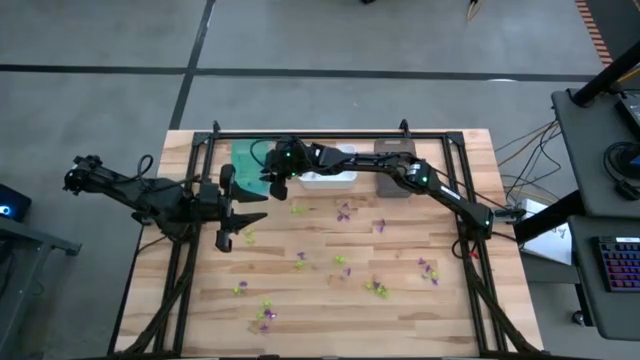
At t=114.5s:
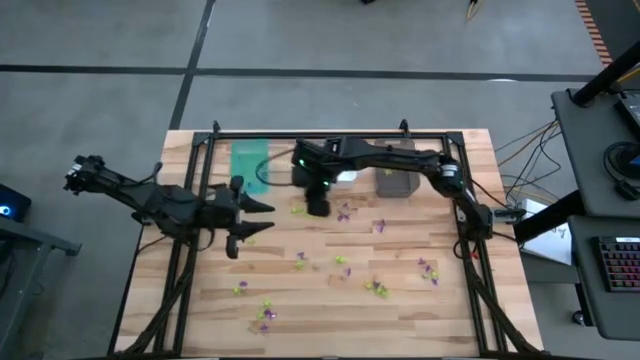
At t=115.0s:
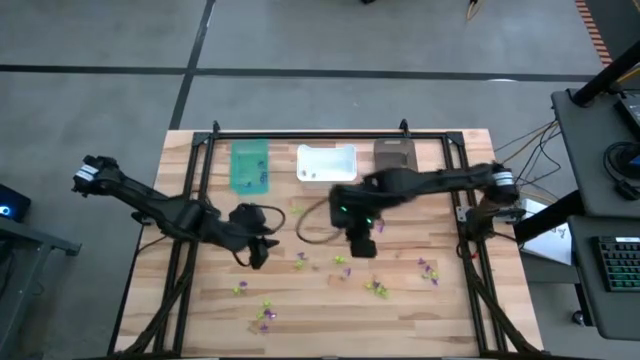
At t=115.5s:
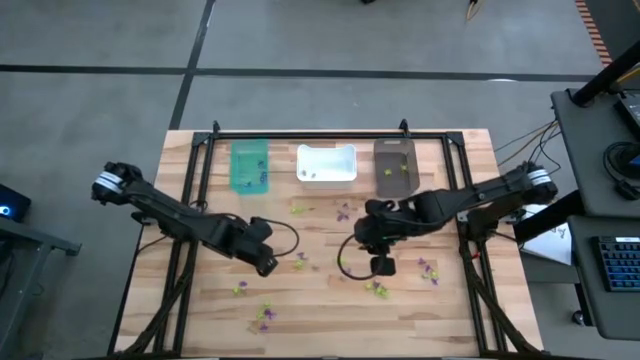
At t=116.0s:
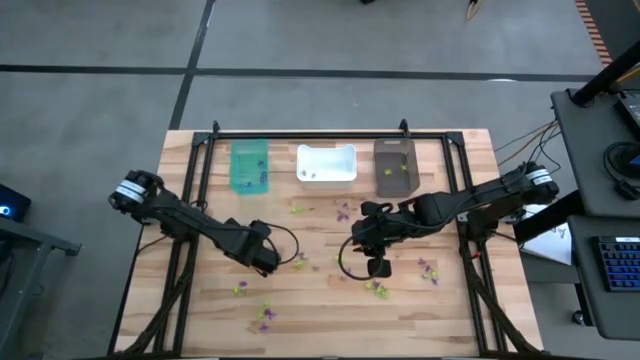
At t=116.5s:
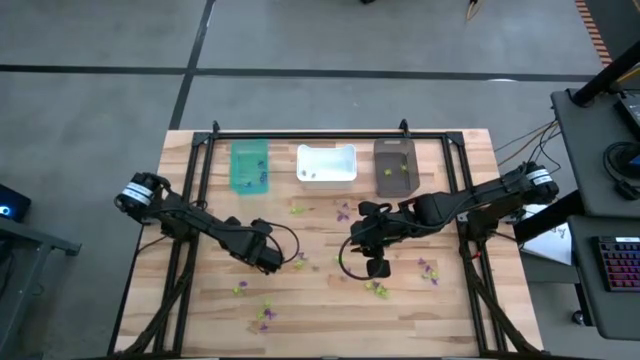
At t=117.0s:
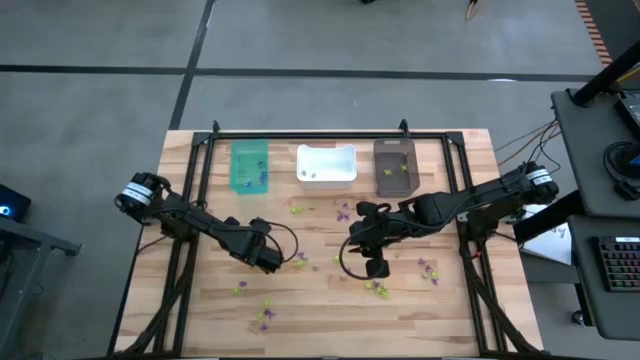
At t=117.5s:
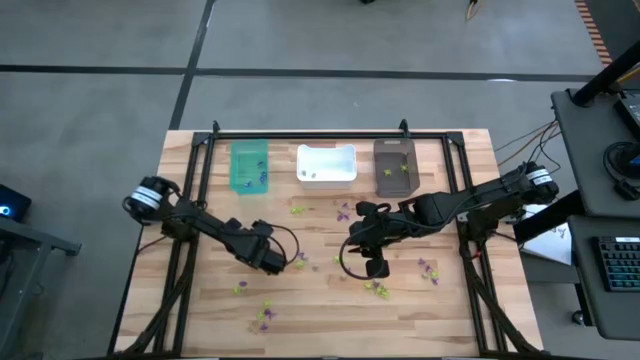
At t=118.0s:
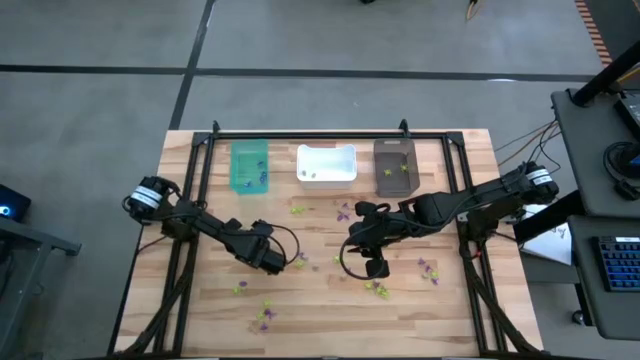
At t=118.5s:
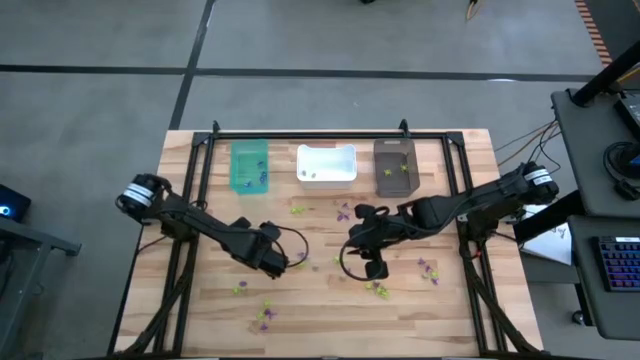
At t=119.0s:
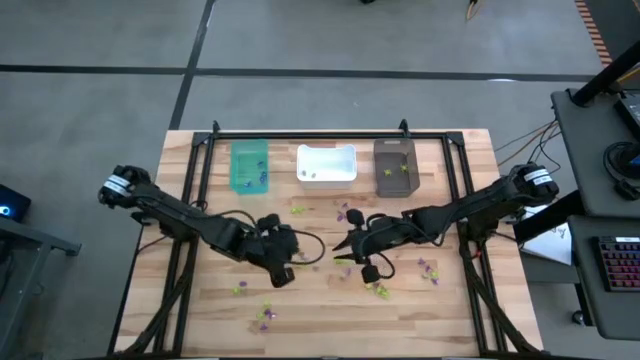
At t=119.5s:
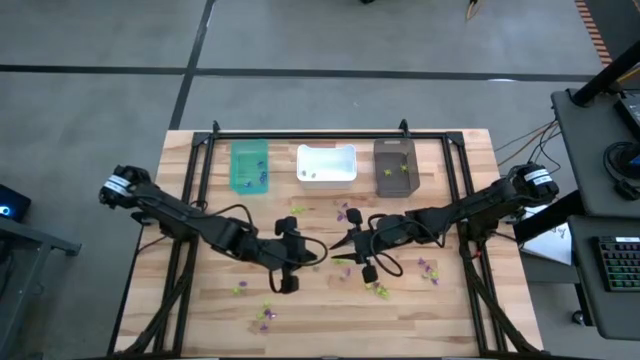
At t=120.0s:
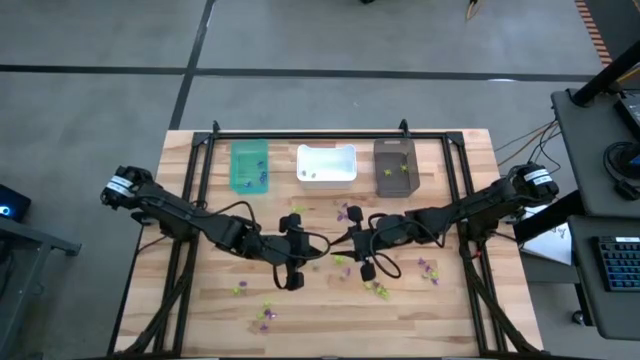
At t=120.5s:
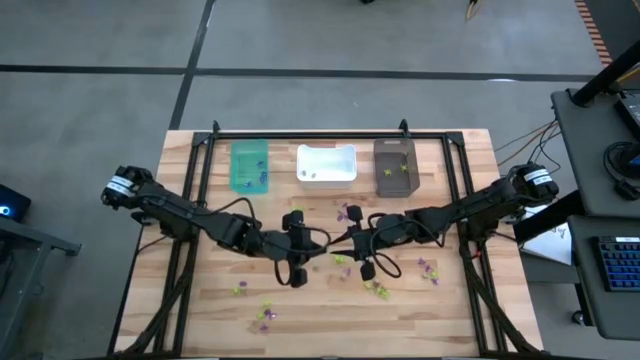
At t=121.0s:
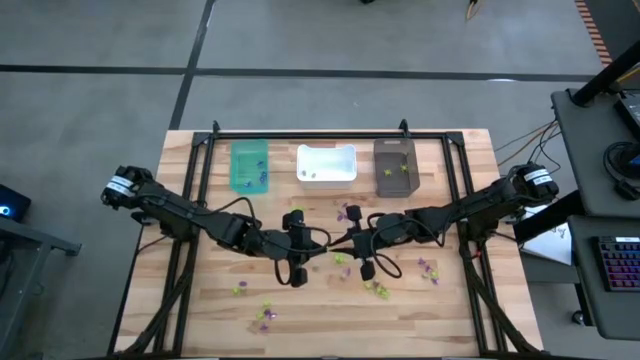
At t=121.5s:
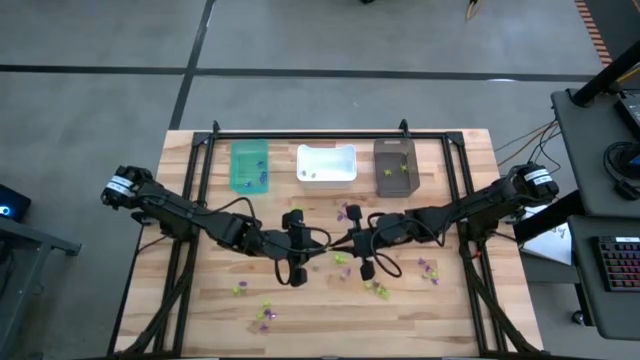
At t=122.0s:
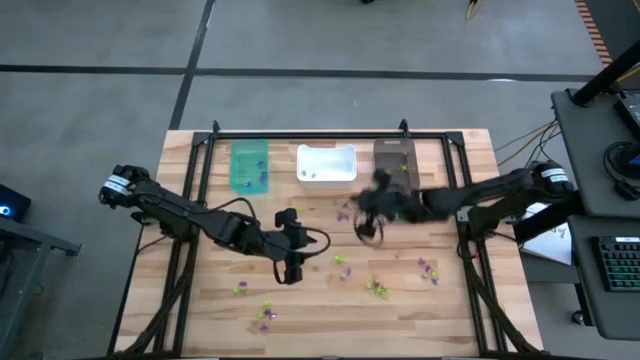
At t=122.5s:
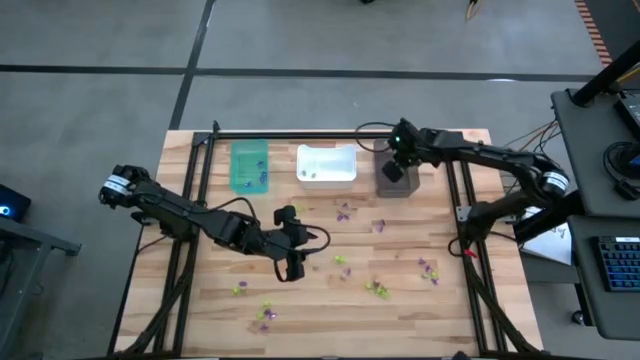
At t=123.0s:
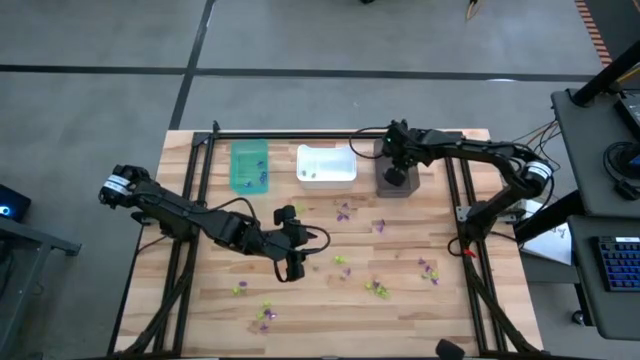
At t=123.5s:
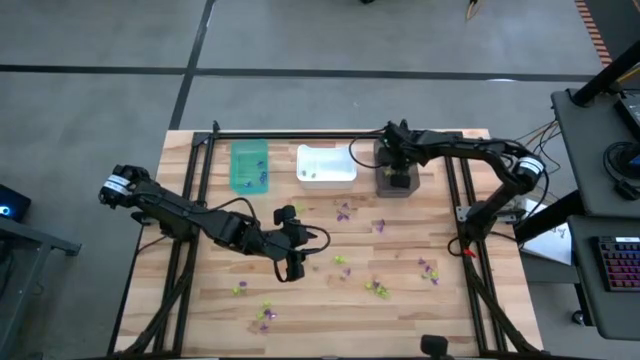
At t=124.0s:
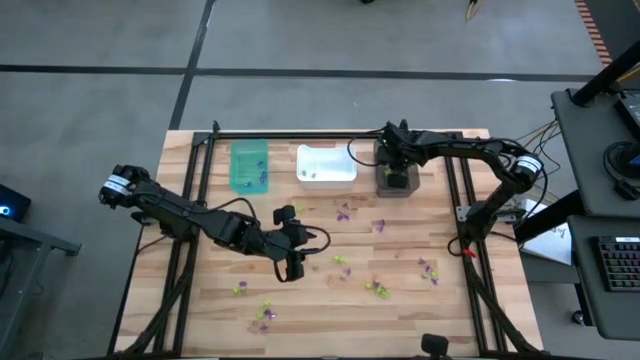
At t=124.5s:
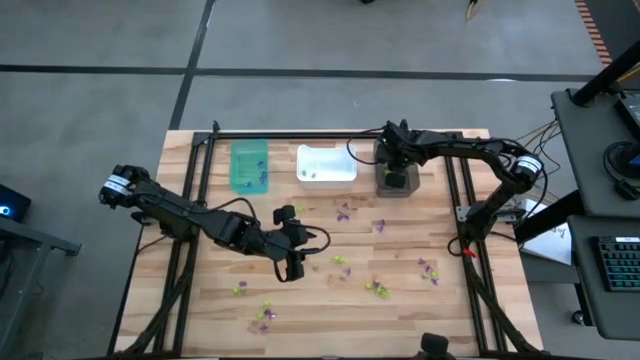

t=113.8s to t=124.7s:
Task: Sort Halloween decoration
Put the green spider toy into the black bin

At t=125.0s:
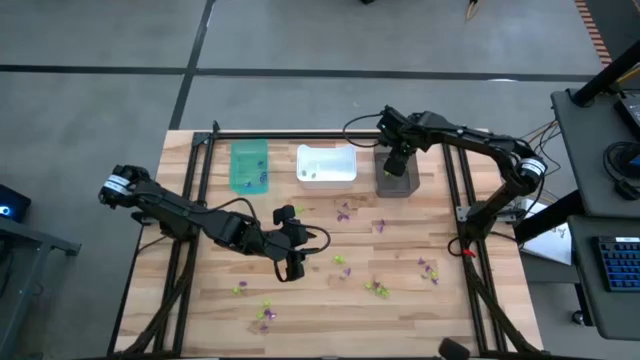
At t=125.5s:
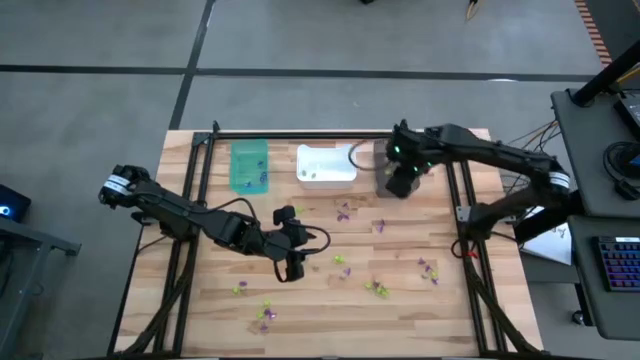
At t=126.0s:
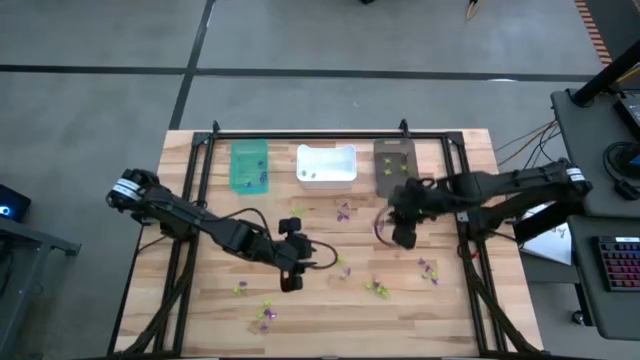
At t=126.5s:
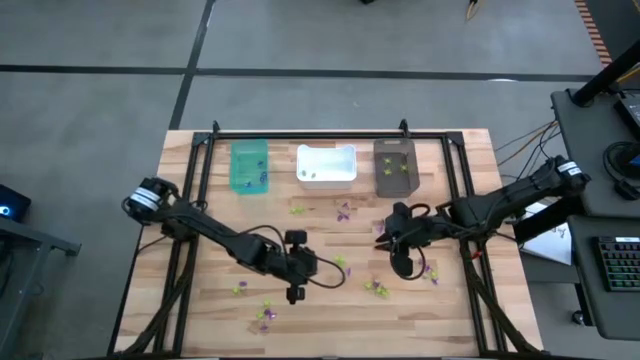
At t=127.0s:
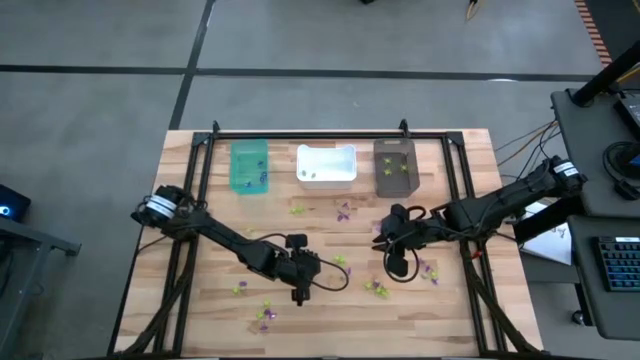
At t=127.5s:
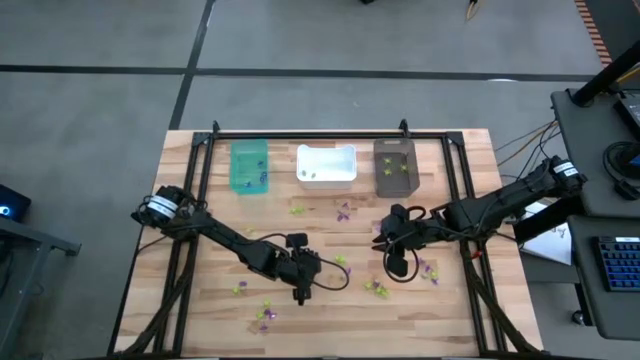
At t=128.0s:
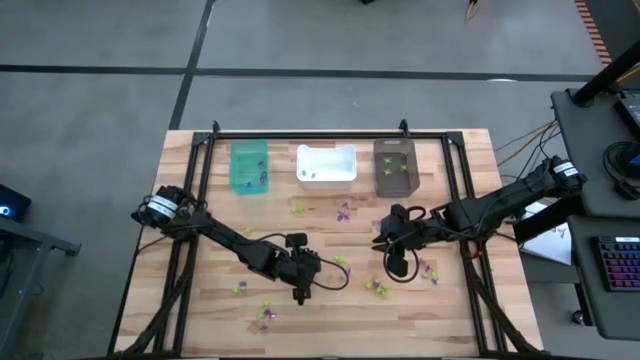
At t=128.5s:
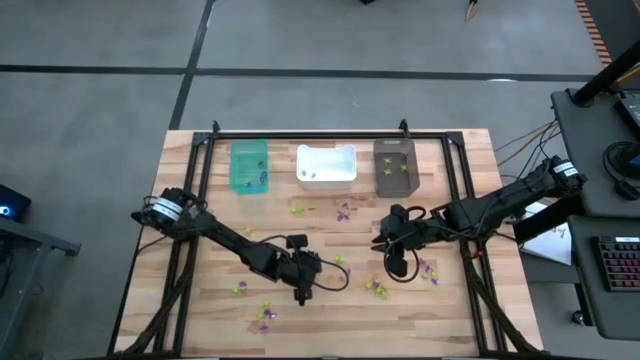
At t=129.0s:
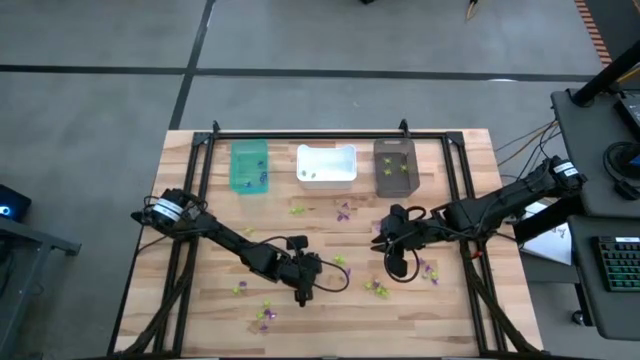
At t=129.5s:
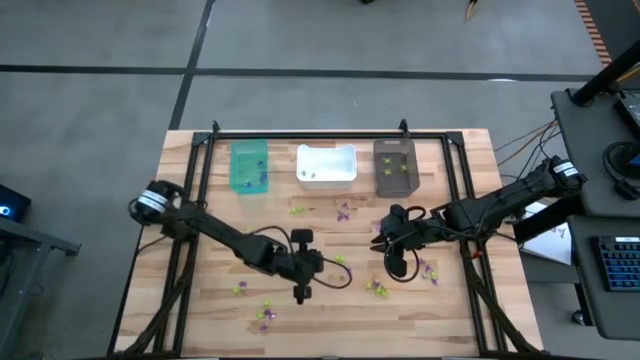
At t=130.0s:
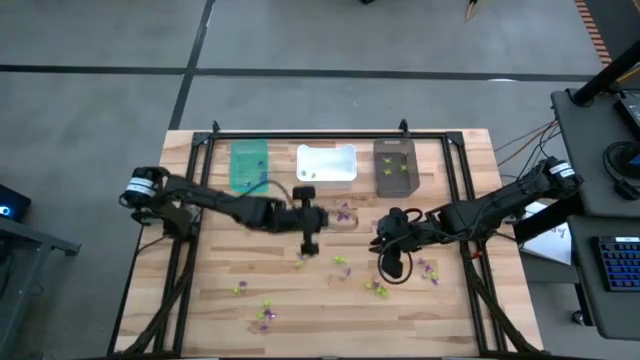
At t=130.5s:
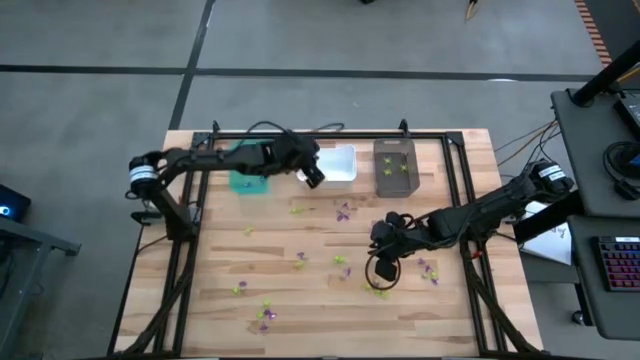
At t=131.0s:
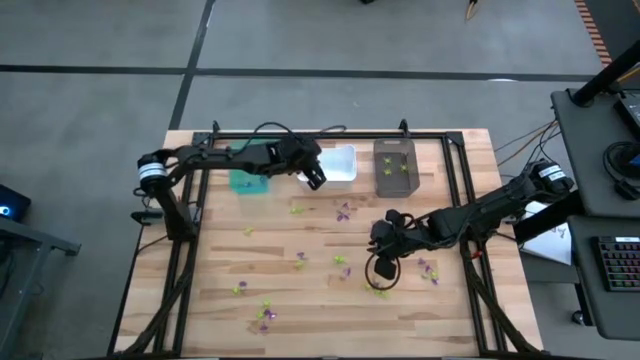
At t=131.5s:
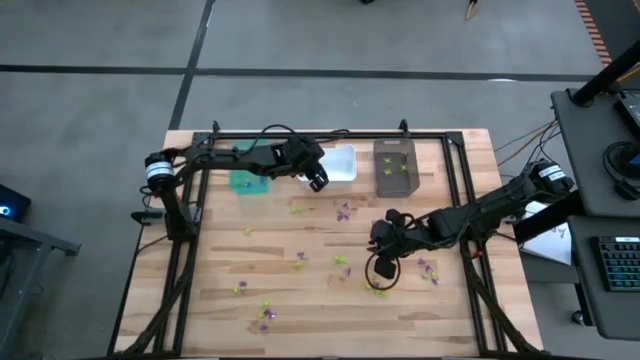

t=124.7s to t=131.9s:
Put the white skull toy into the white bin

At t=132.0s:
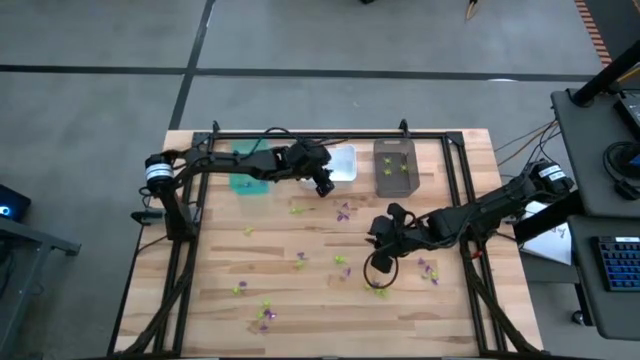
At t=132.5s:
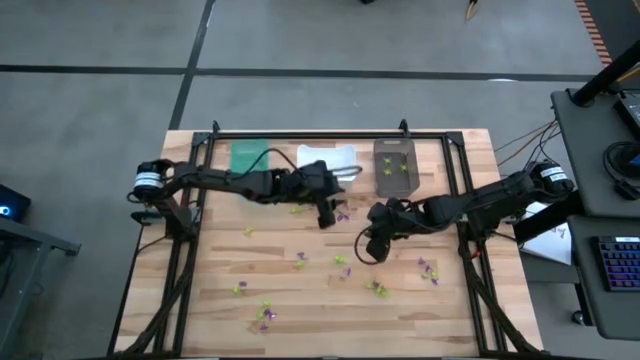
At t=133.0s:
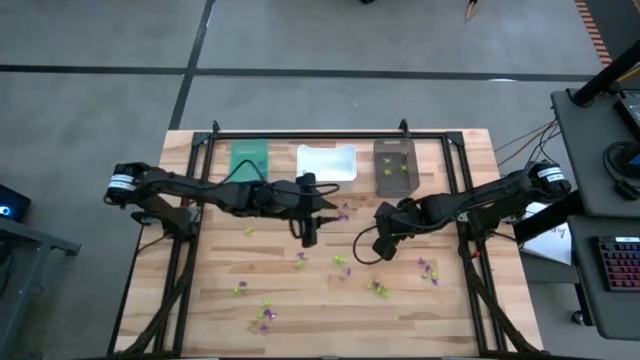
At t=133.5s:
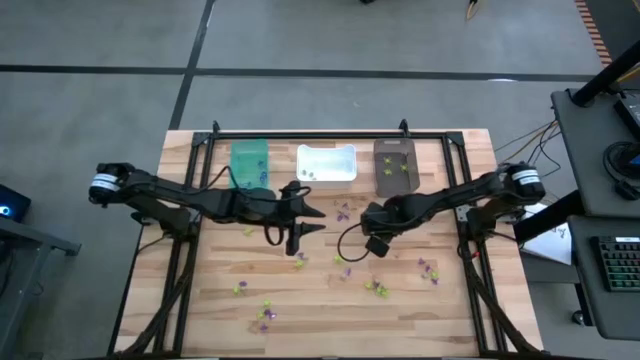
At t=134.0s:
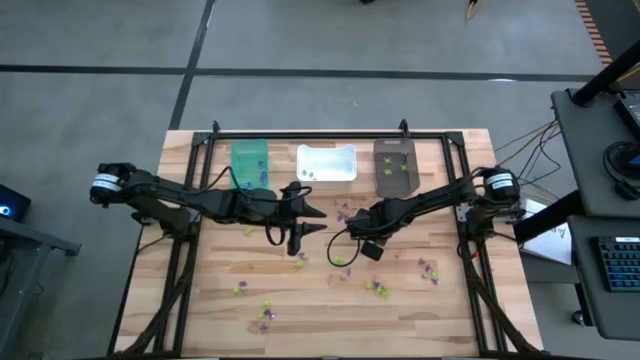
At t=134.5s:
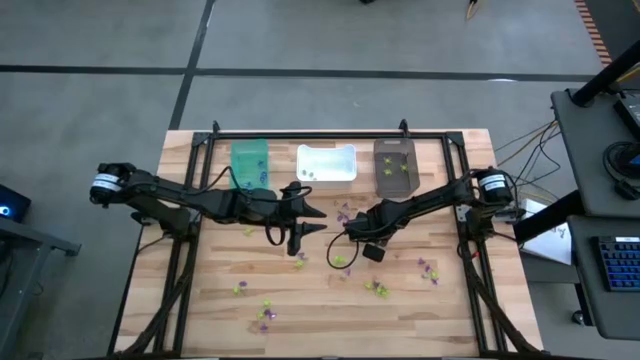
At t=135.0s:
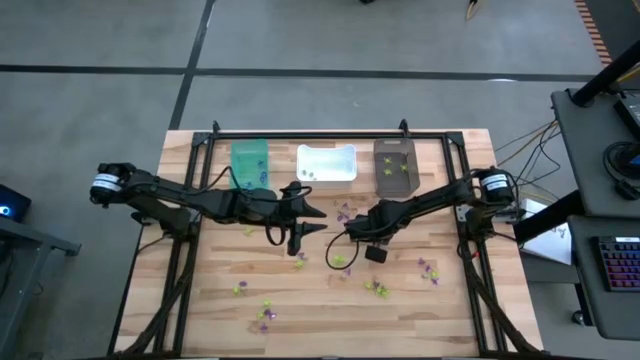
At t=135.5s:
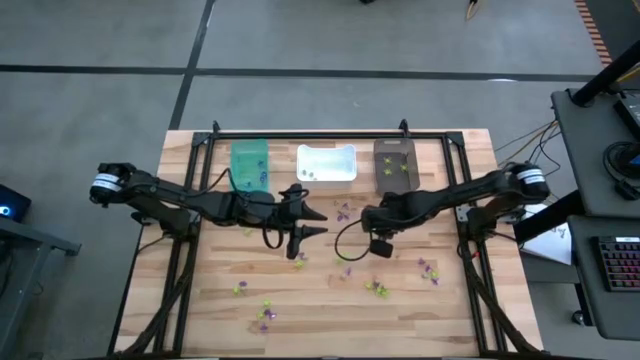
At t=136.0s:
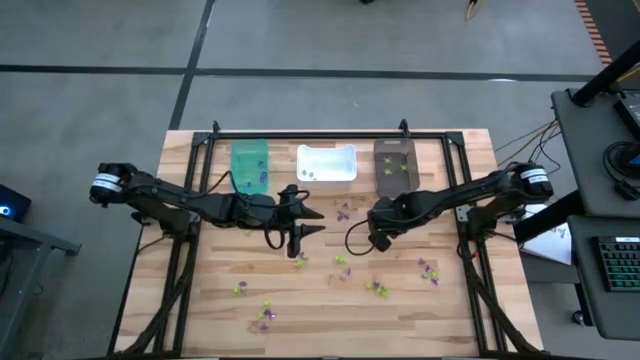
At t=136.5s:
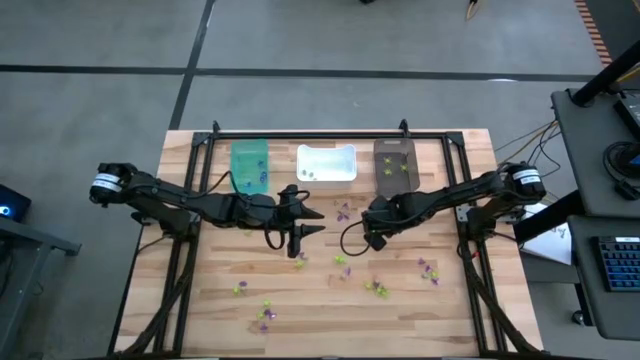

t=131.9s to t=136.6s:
Put the purple witch hat toy into the light blue bin
